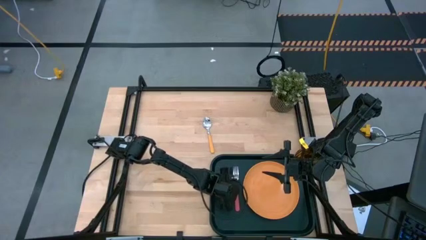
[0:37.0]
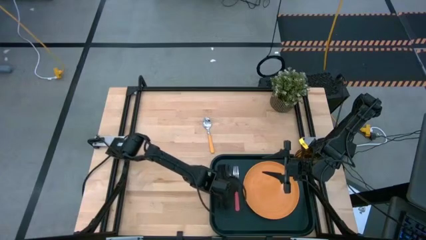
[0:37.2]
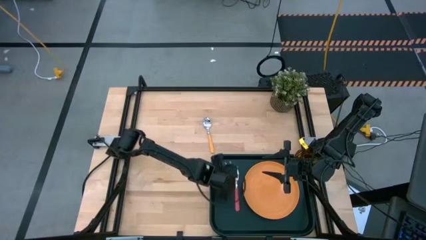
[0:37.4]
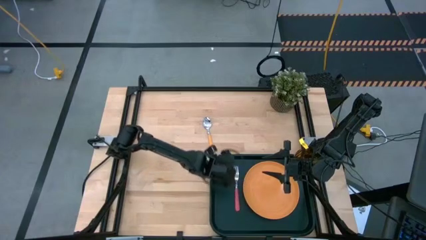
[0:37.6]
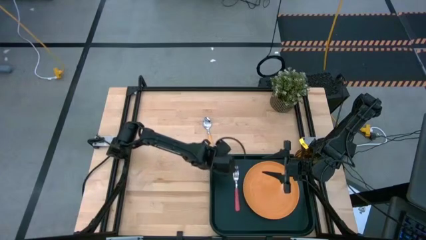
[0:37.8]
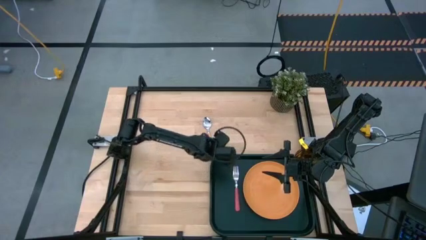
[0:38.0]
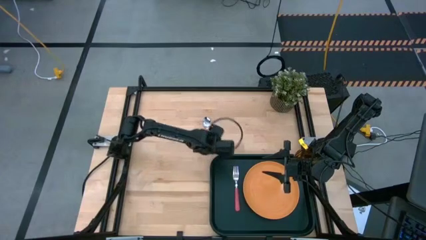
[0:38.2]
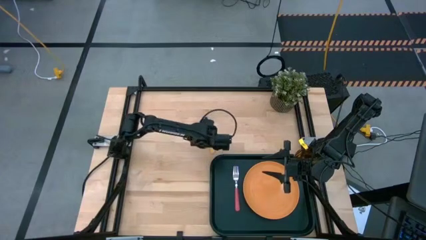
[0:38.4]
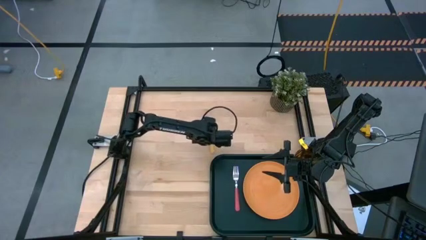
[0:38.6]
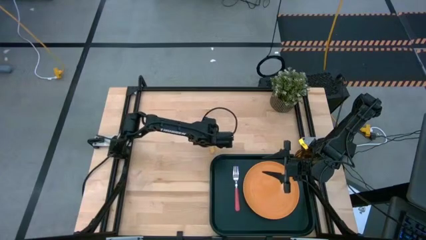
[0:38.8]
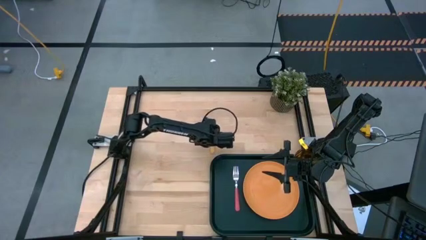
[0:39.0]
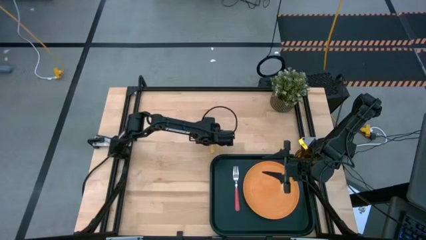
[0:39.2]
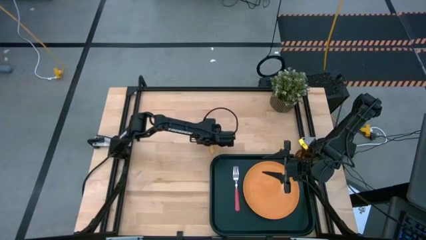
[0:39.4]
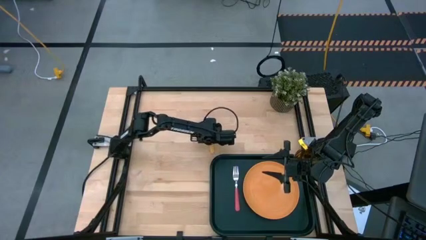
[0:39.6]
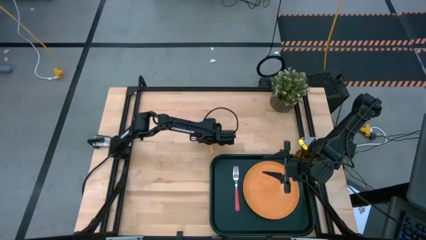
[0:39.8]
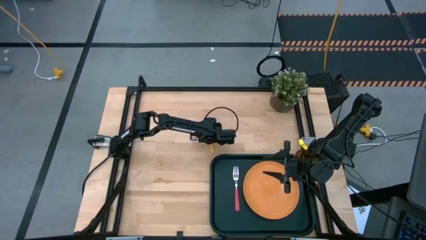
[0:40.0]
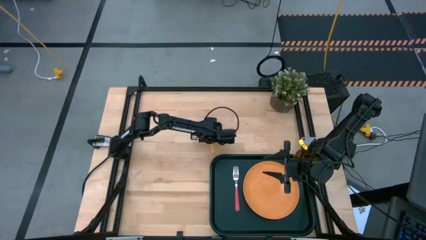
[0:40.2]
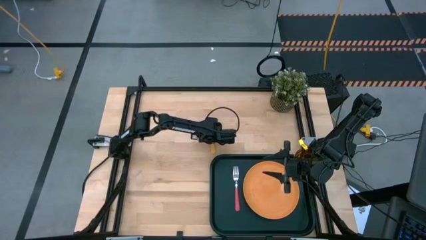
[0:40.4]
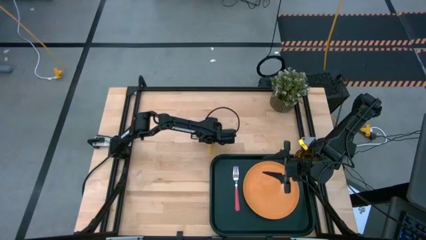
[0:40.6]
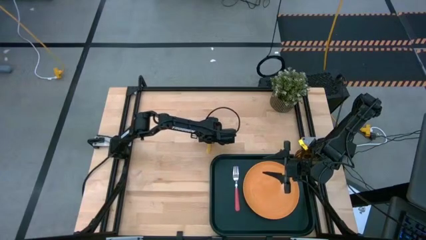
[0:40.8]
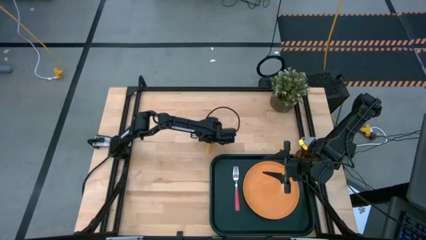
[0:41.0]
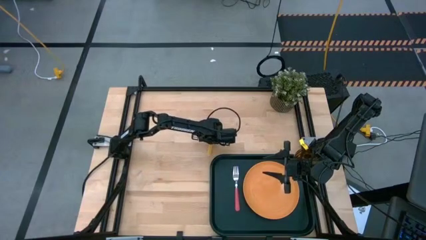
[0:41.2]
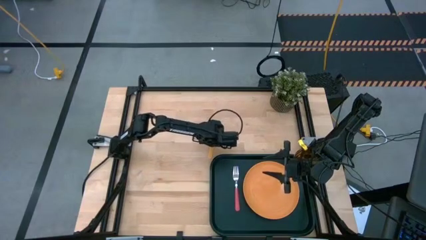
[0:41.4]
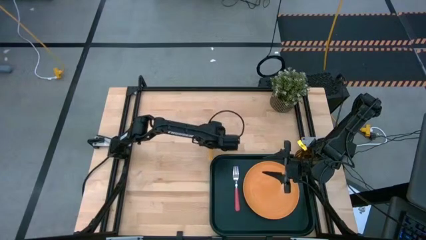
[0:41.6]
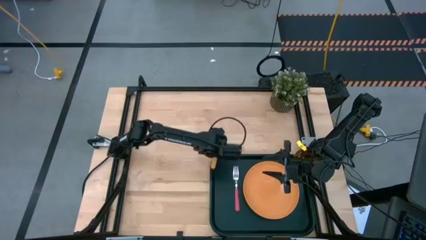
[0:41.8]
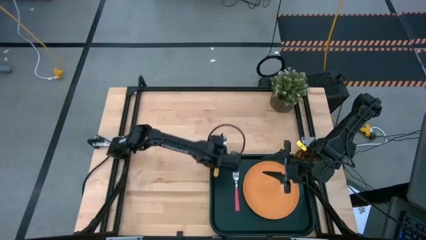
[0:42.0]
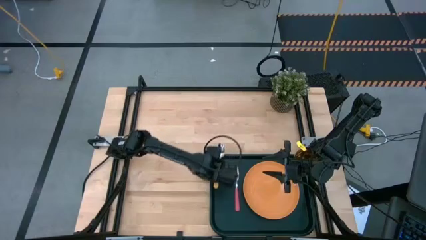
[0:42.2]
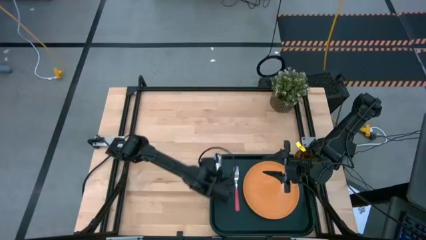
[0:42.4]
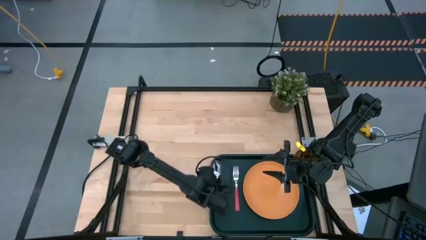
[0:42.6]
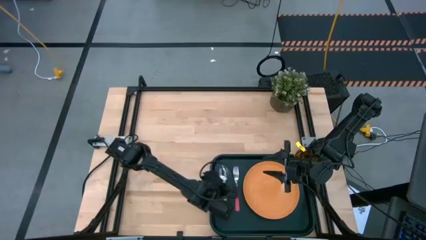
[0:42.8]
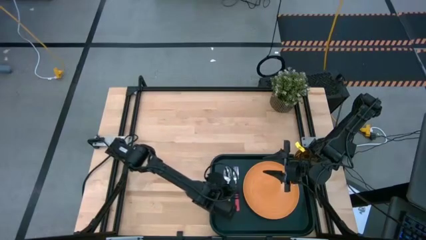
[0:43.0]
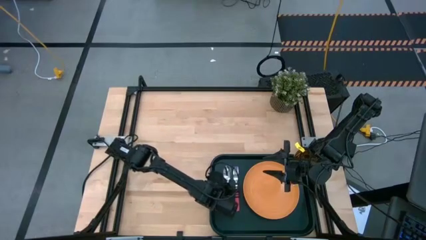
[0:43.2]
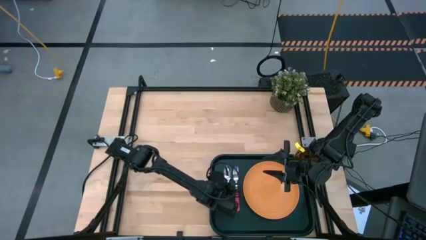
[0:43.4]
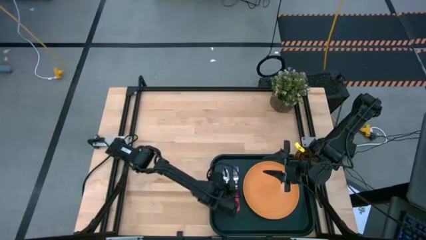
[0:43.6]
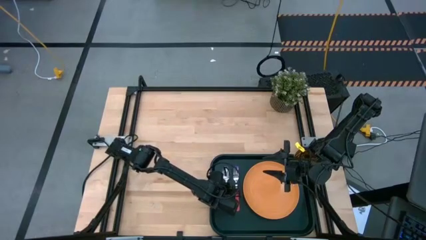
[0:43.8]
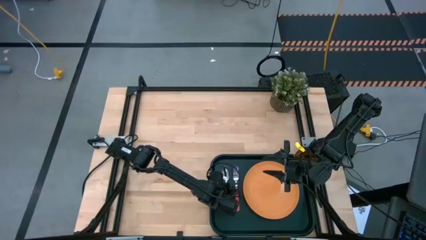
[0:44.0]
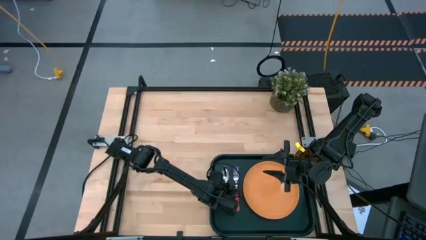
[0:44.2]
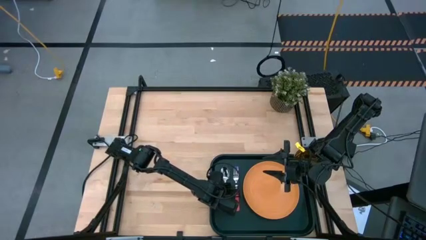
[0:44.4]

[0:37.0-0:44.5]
Task: Pick and place plate/cup/fork/spoon on tray
Put the yellow spoon on the left side pink fork

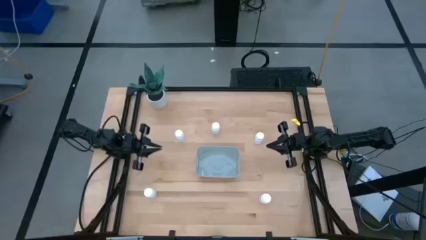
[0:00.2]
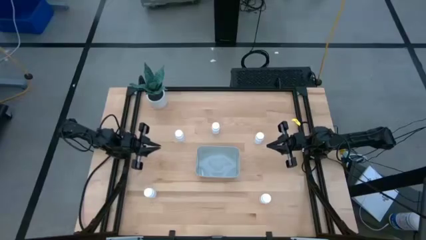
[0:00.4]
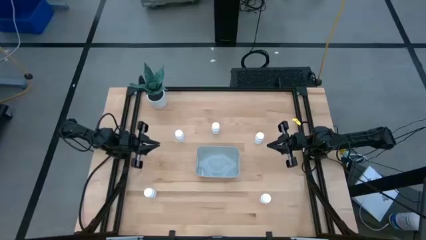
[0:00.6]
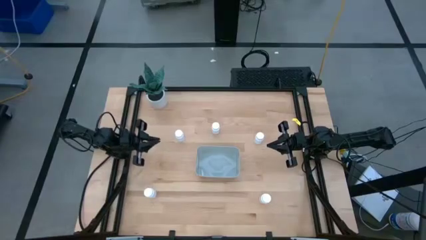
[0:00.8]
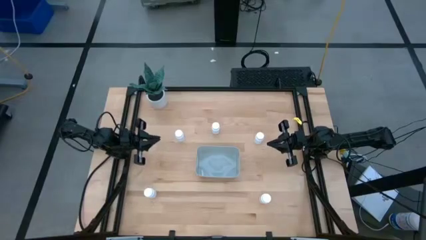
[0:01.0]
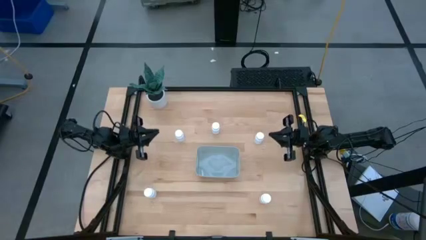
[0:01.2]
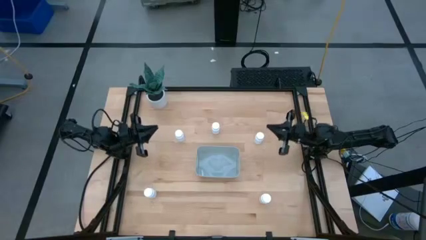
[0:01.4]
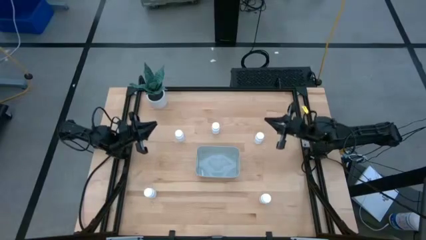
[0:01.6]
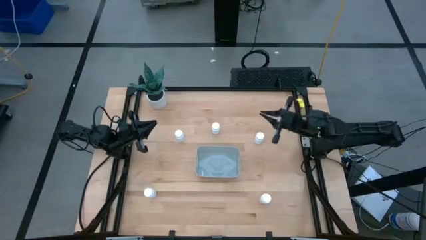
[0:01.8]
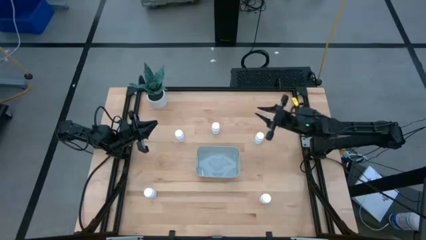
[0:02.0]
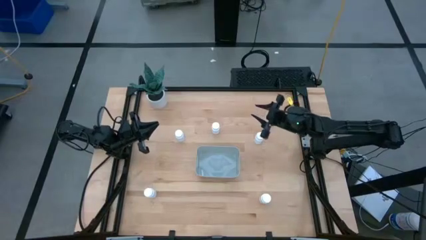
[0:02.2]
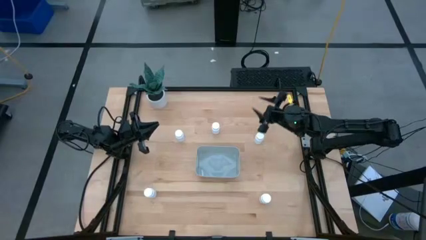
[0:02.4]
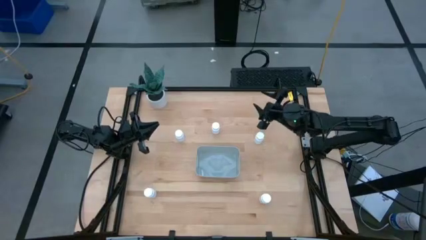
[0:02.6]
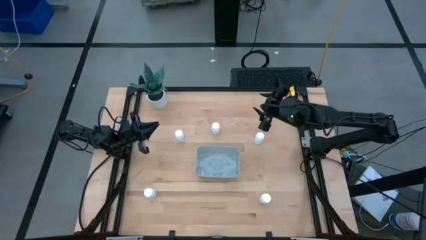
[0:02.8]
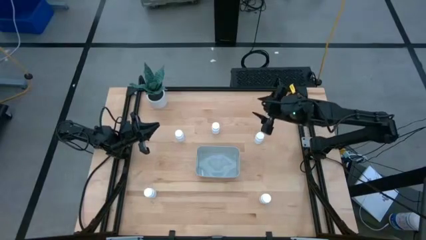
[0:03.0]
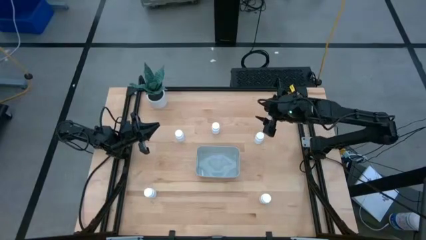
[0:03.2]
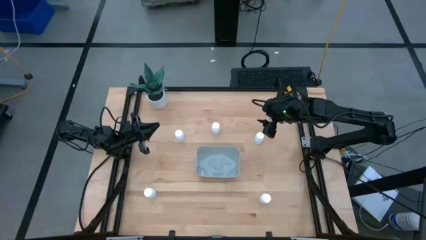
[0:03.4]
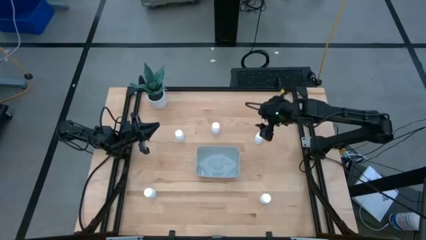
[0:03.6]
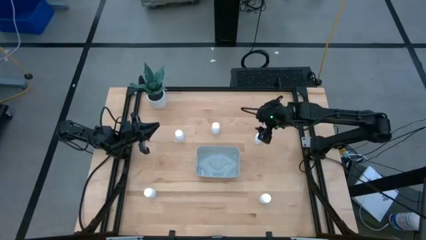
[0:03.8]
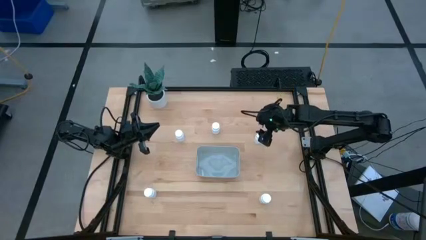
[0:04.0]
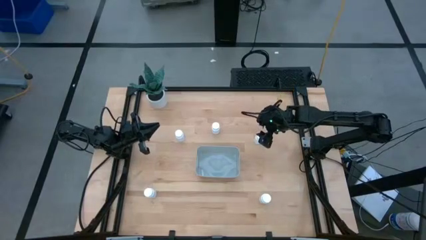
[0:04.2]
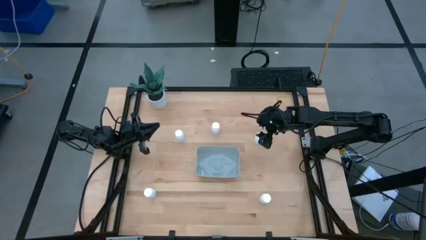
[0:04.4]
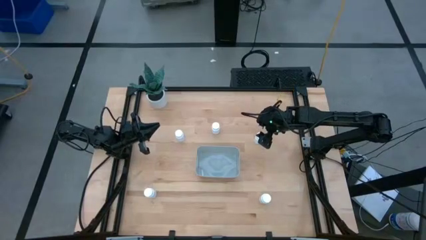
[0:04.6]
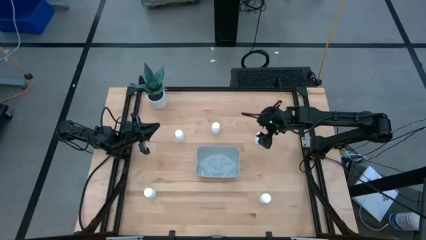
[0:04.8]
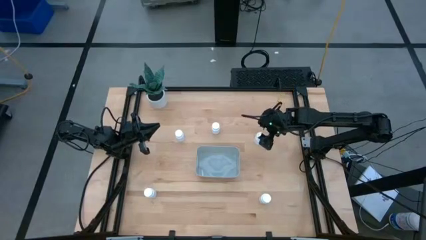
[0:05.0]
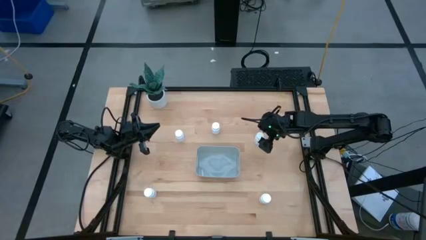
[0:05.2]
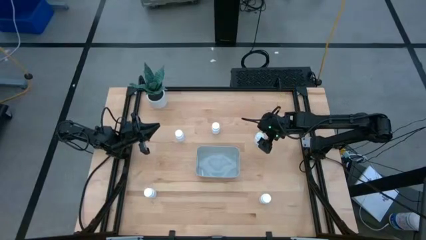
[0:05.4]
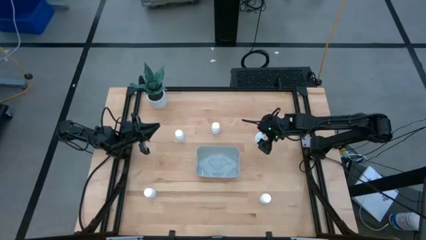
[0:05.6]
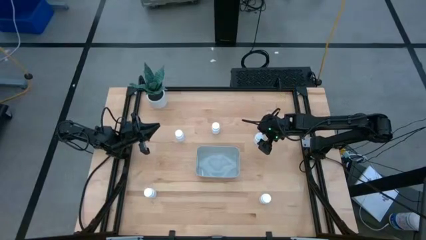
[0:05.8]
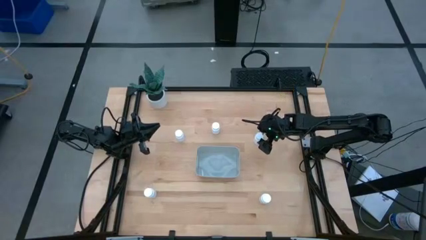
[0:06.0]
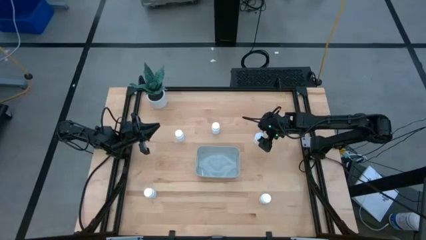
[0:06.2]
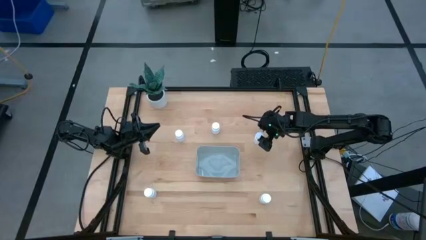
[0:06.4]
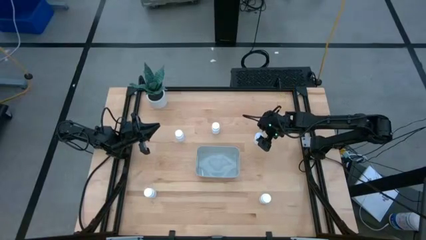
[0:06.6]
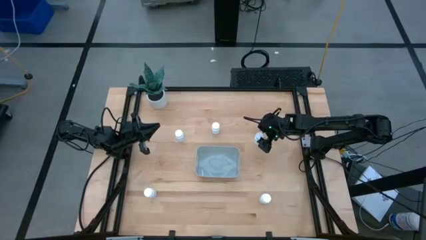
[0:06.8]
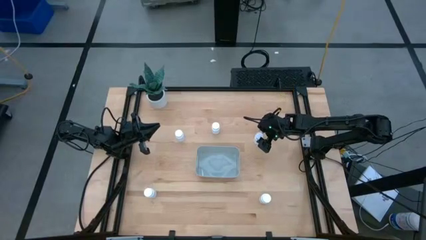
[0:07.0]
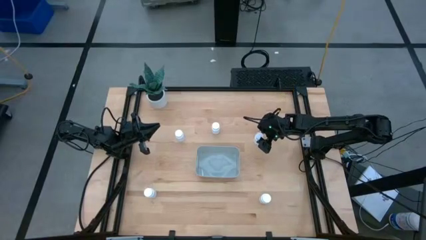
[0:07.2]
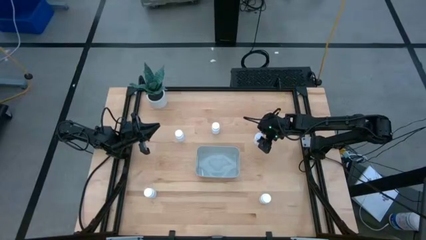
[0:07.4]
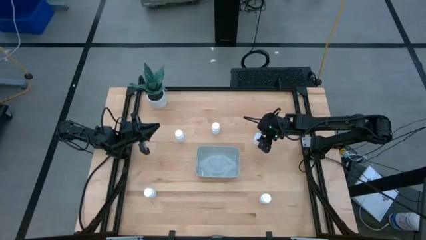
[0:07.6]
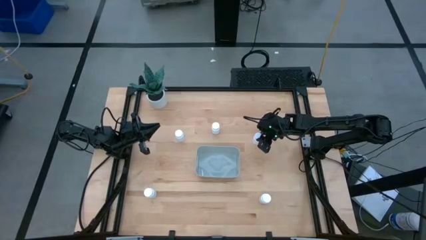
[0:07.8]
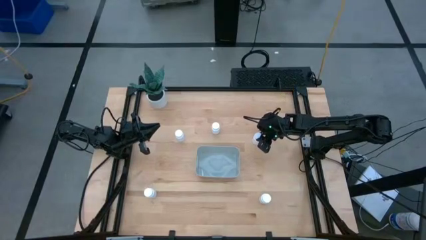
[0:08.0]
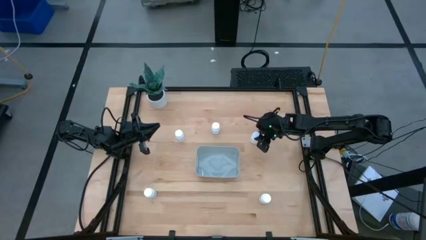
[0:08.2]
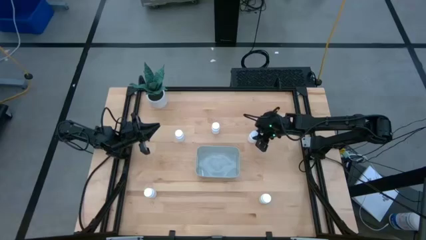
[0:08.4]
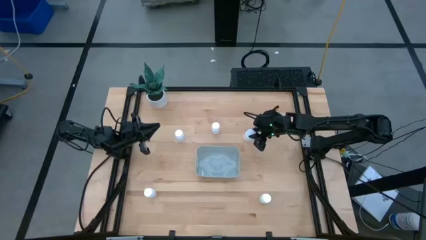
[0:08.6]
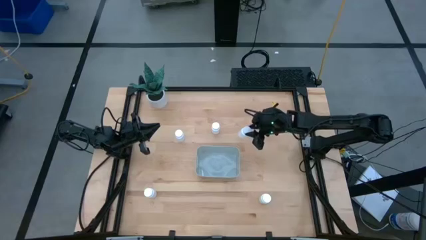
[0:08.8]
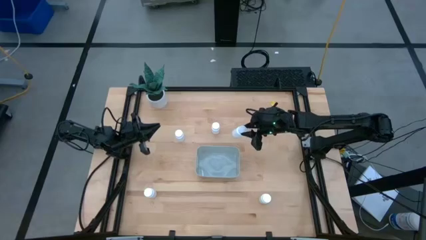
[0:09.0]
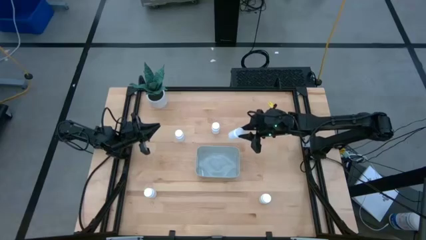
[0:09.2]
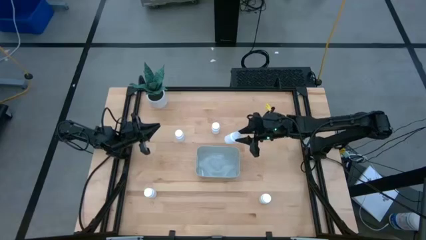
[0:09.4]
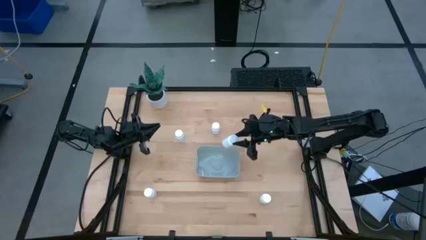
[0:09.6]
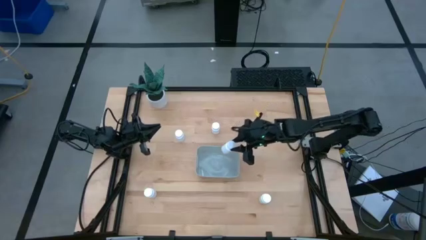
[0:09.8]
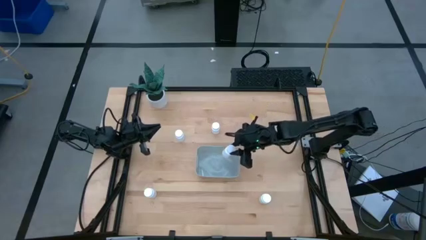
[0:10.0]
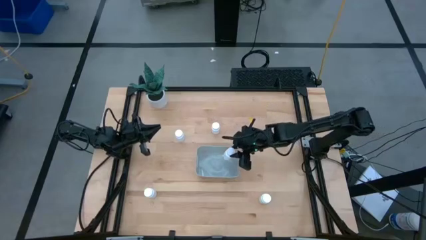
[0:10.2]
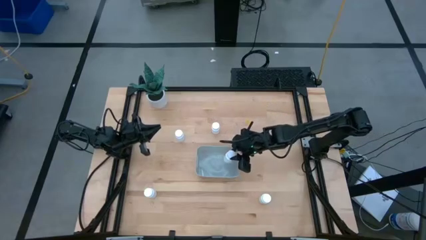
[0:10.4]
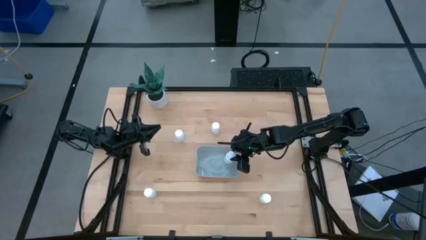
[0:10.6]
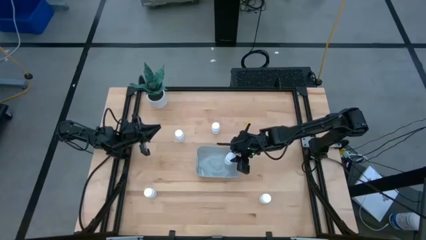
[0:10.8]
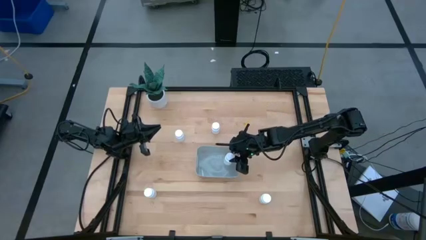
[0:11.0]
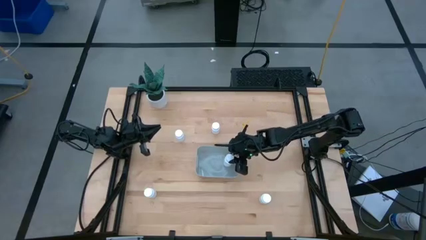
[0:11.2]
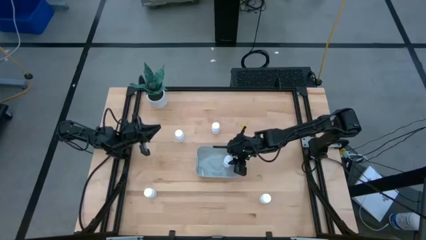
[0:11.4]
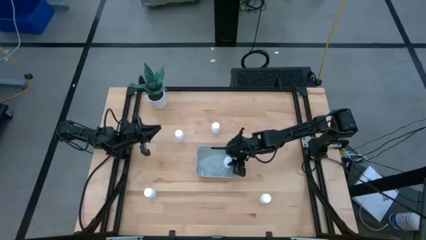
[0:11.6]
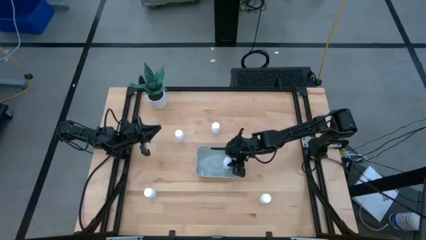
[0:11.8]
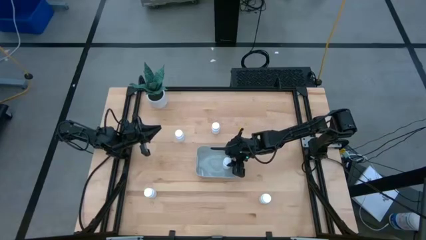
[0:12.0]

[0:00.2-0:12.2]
Task: Pick and place pill bottles into a basket
Put the white pill bottle into the gray bin
